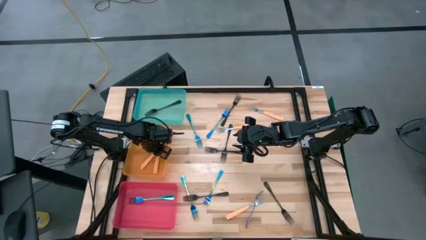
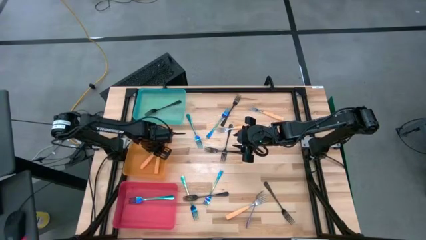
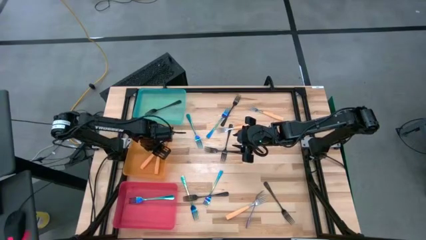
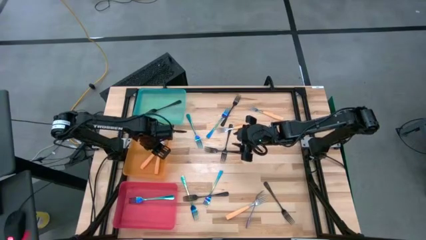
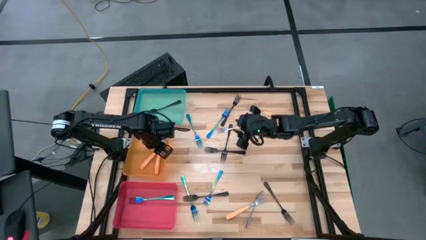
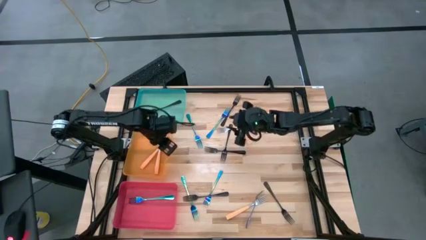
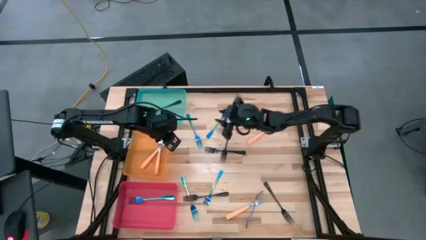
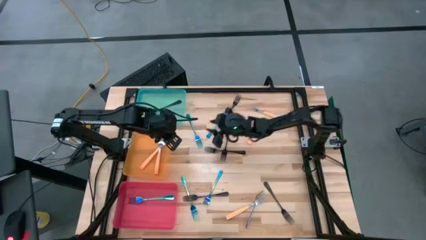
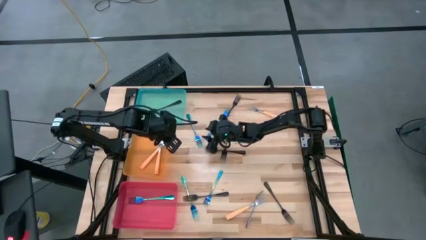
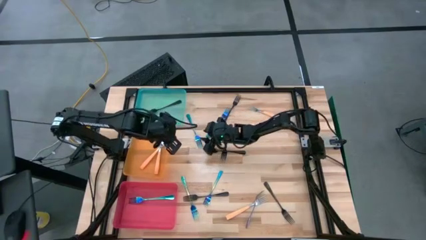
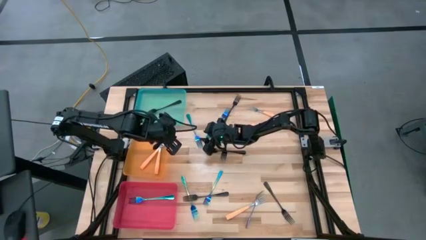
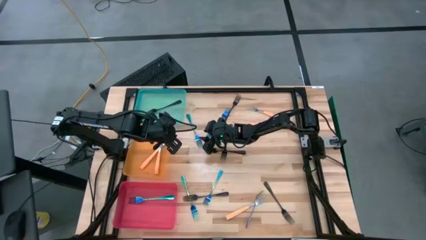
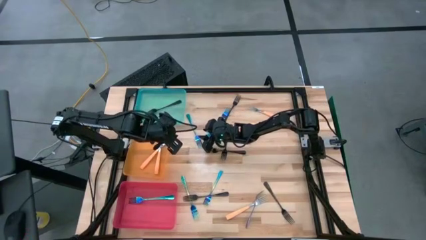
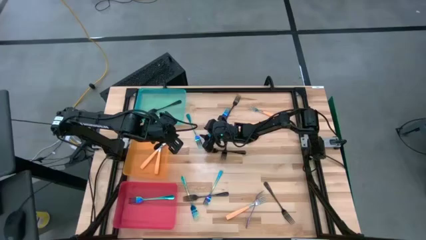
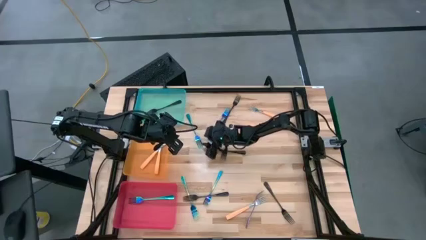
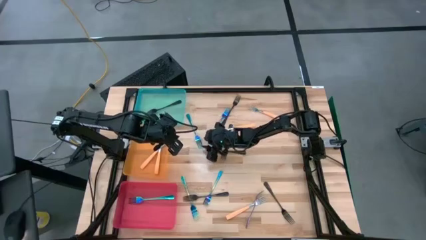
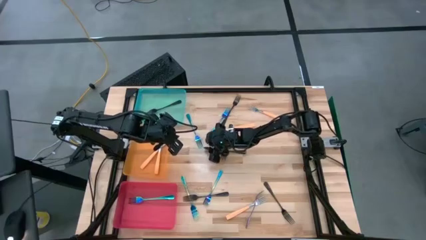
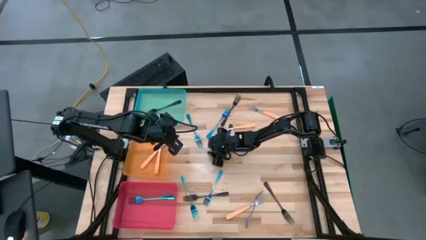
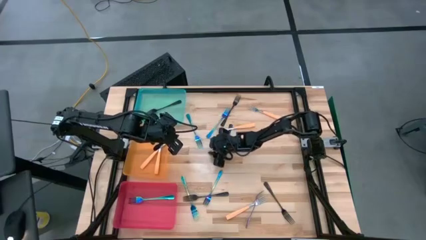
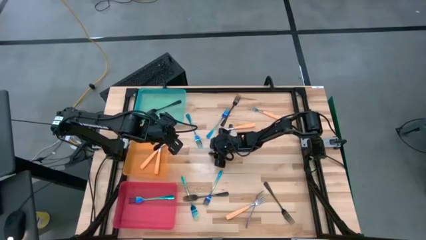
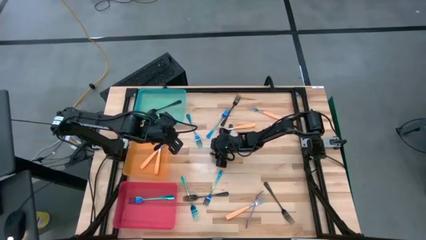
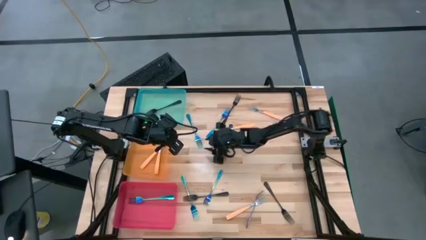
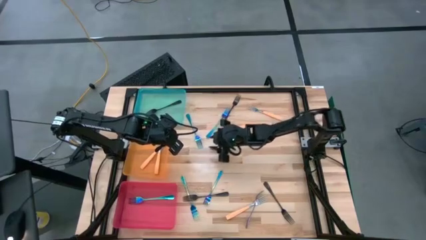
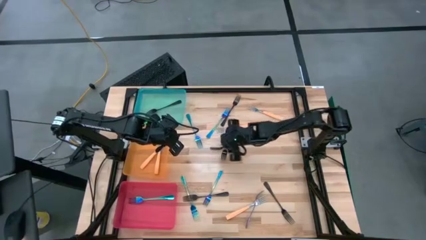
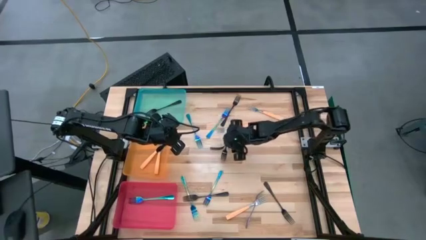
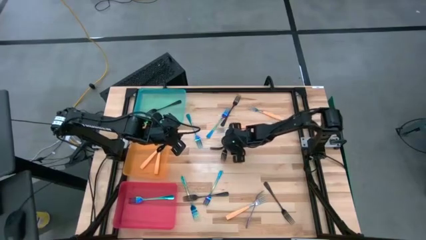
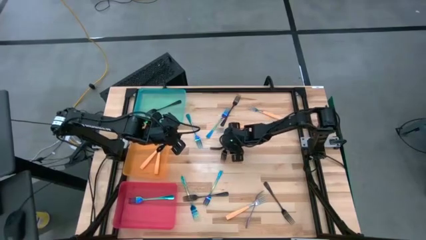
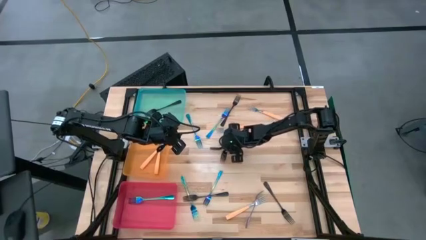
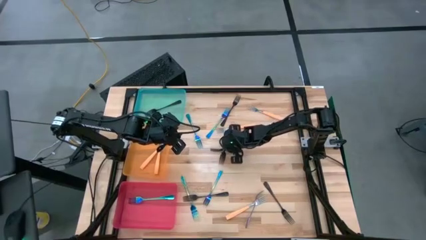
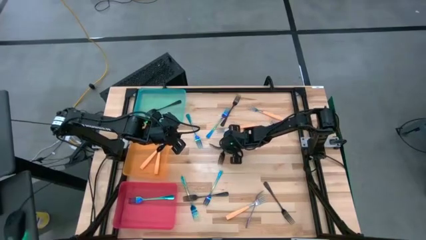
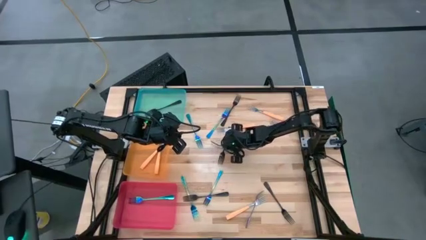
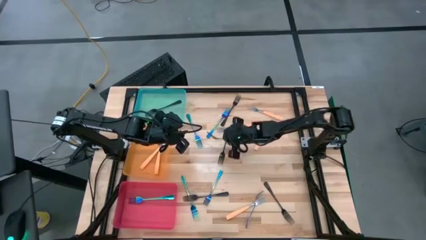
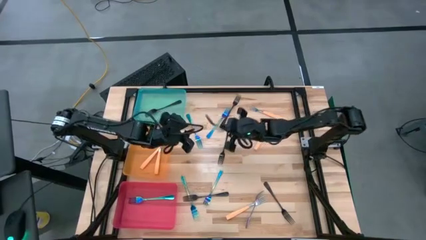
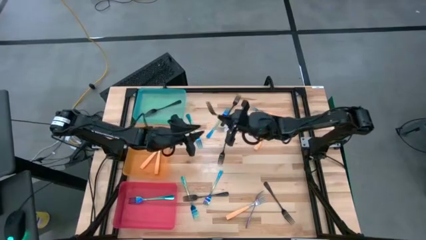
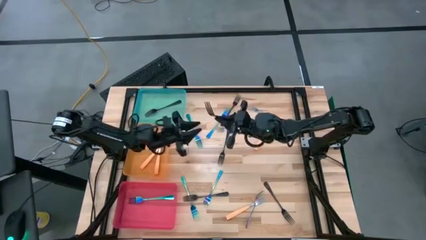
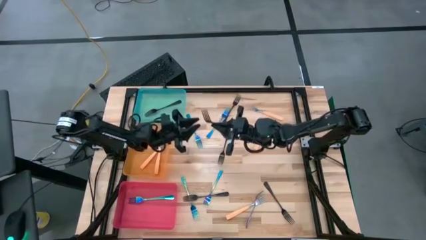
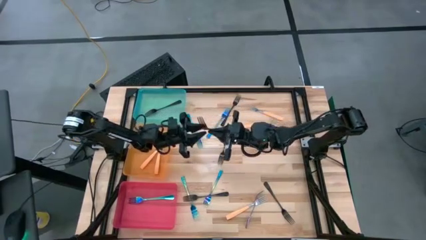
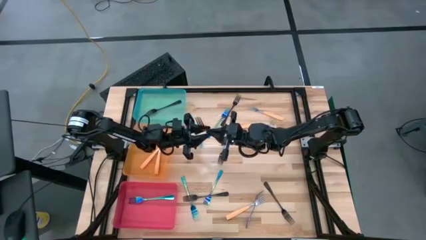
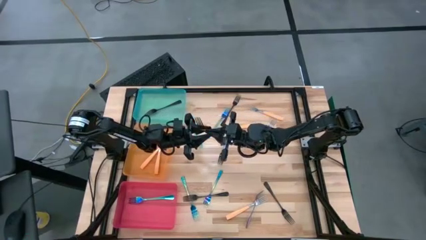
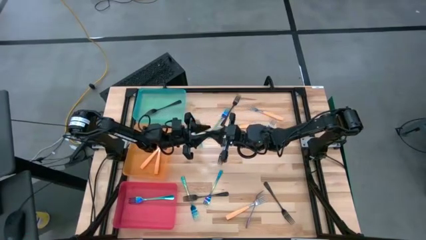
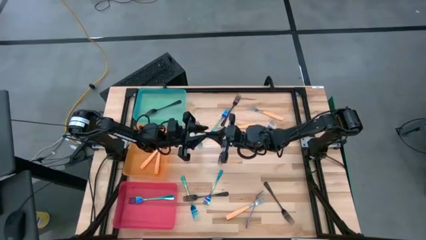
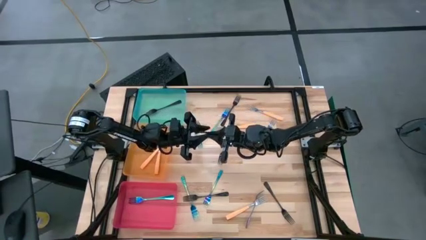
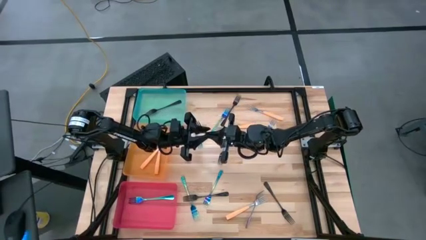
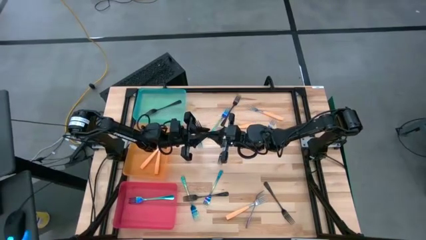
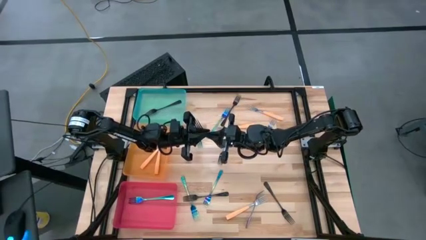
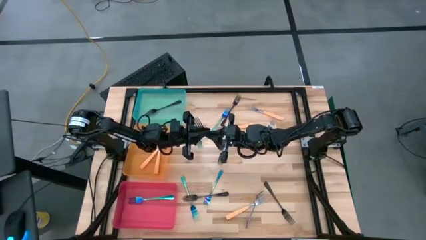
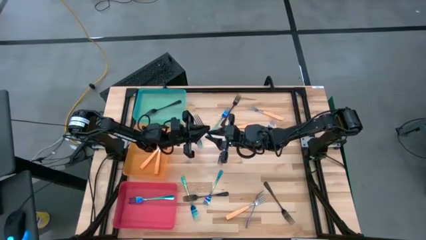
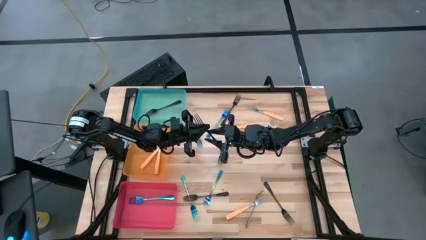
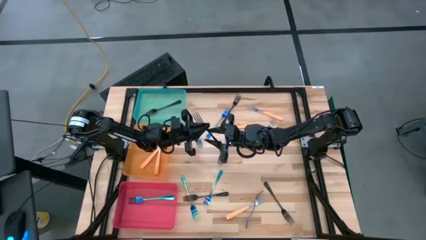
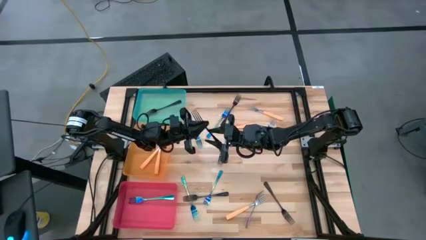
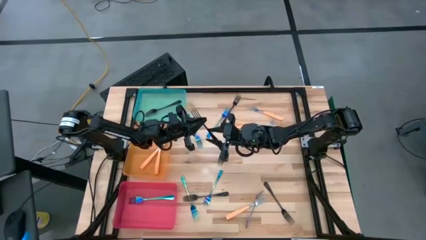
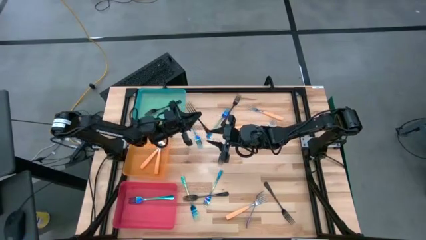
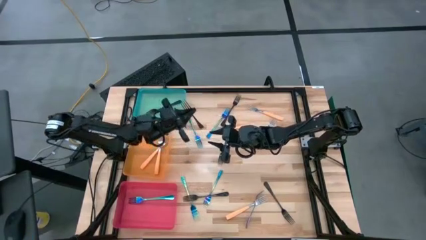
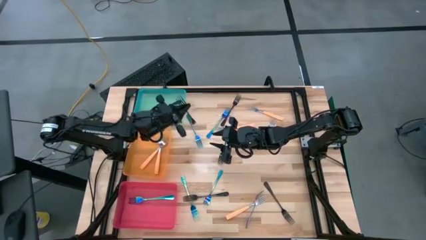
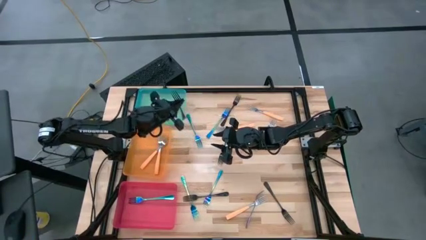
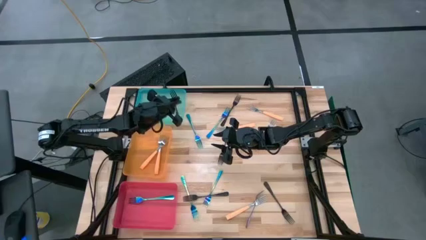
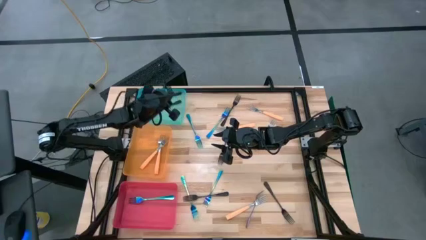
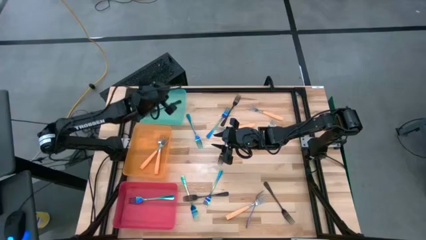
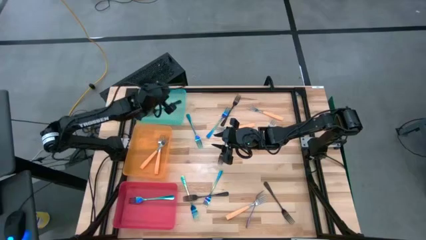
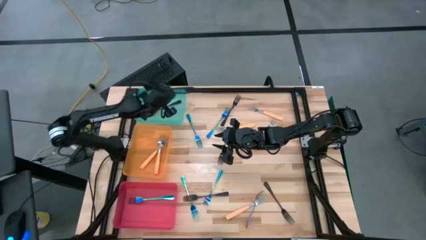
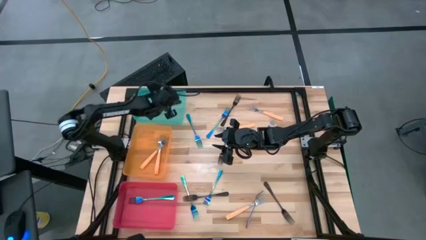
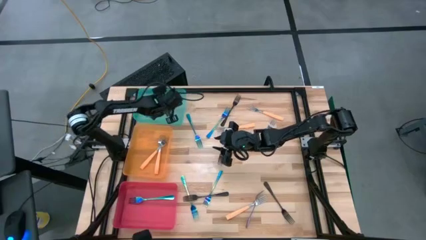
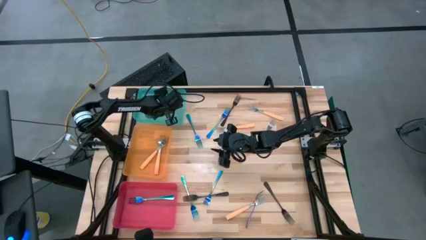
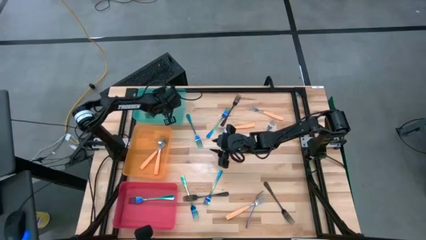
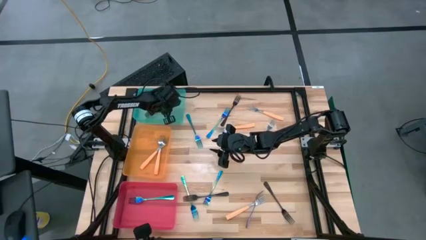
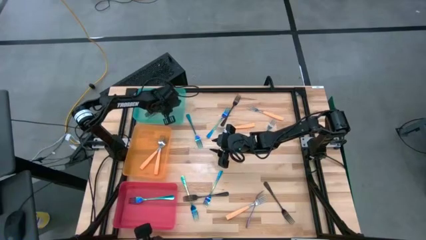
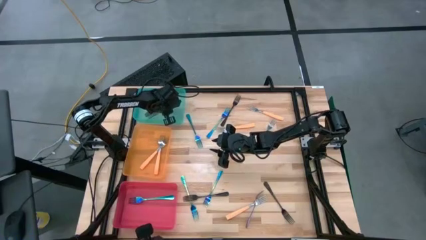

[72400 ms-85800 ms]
Task: Sort silverware by color (type)
Put the black fork into the blue bin

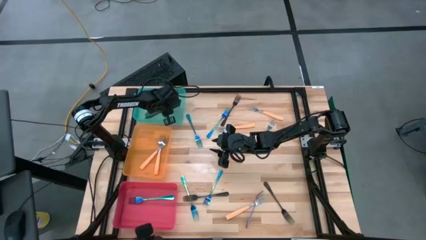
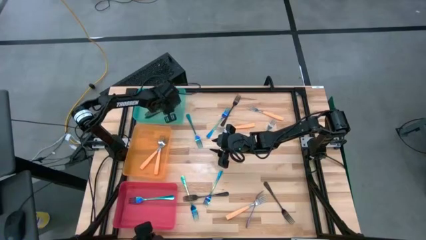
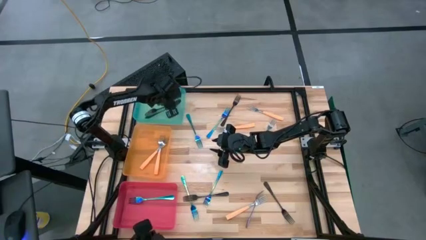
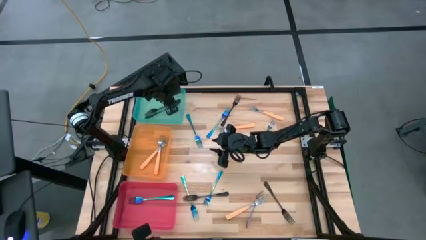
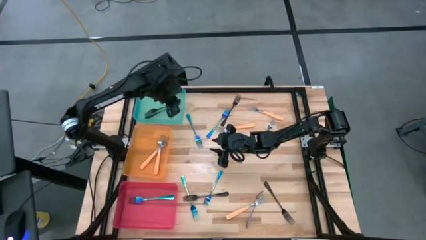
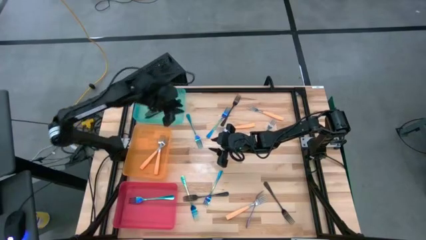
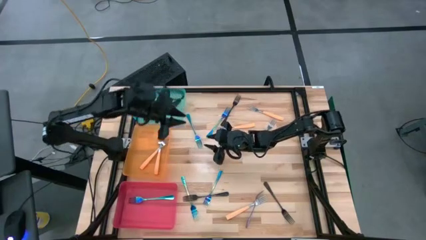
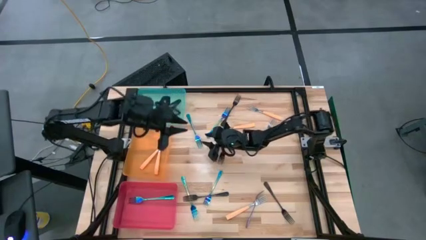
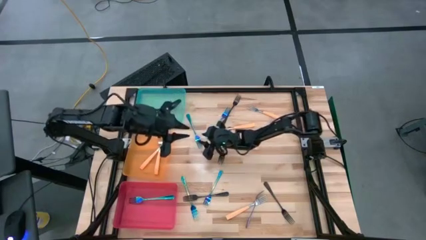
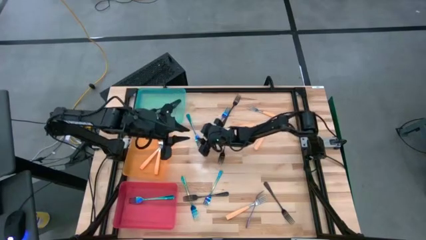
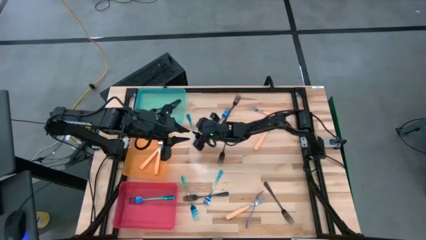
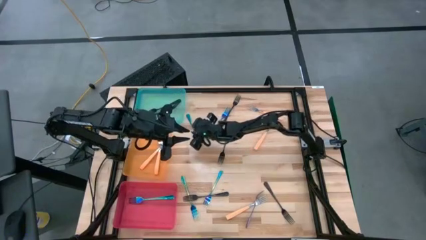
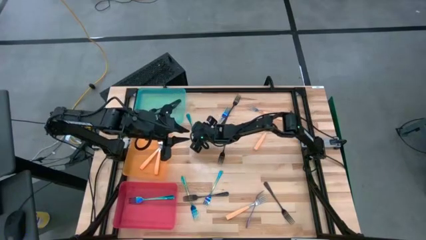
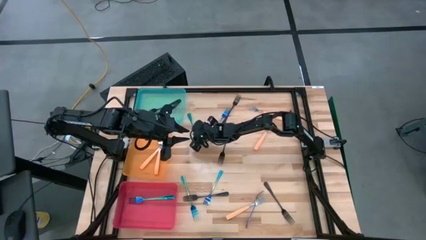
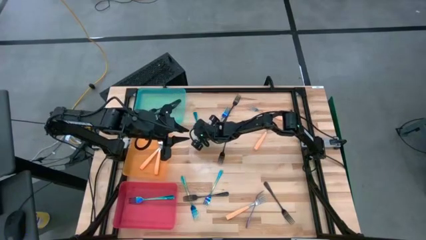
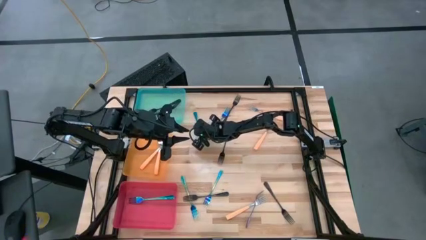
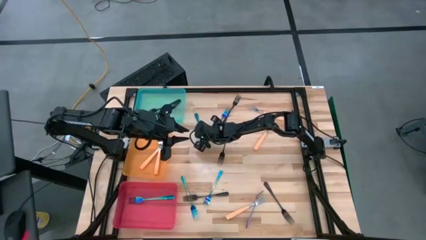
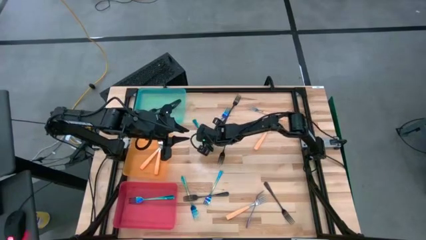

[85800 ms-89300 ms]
Put the blue fork into the pink bin
